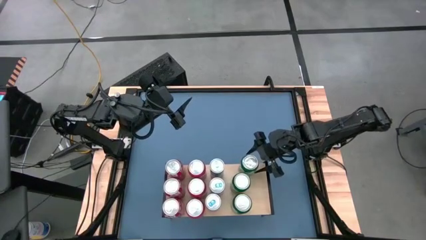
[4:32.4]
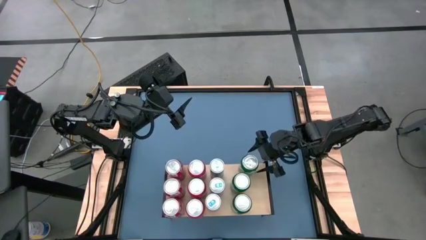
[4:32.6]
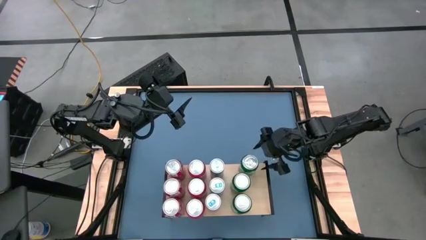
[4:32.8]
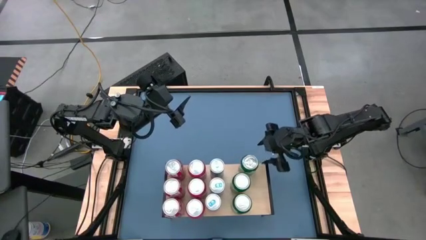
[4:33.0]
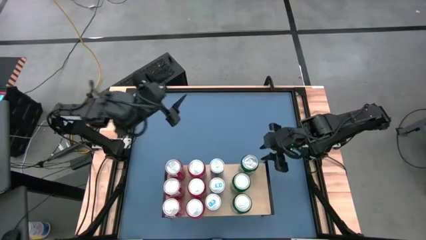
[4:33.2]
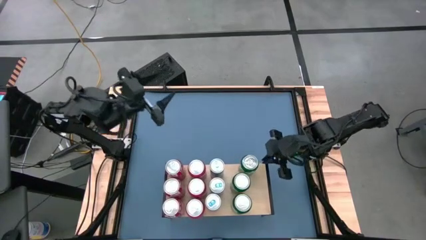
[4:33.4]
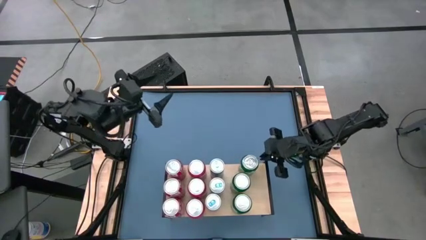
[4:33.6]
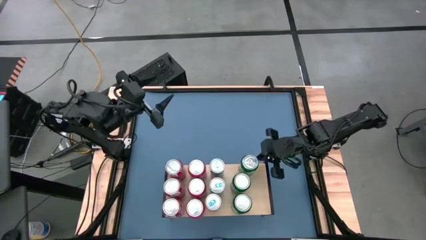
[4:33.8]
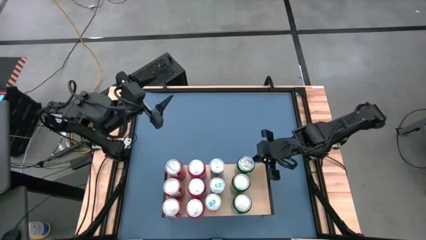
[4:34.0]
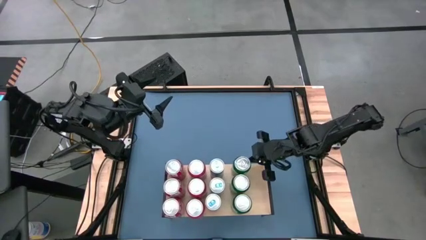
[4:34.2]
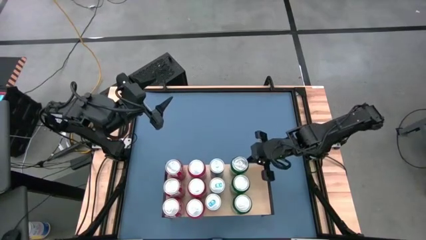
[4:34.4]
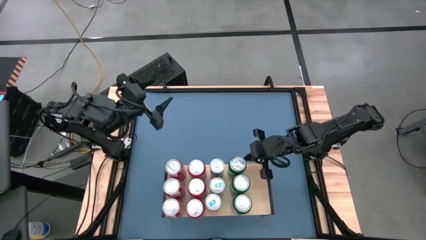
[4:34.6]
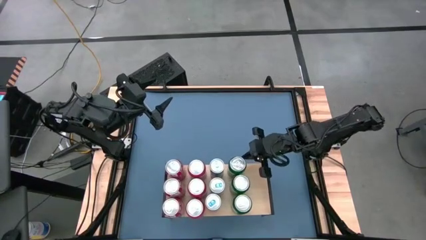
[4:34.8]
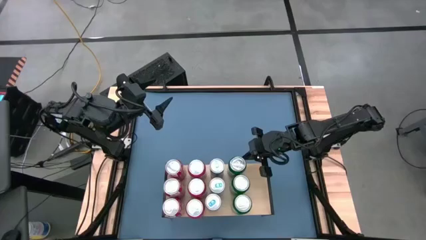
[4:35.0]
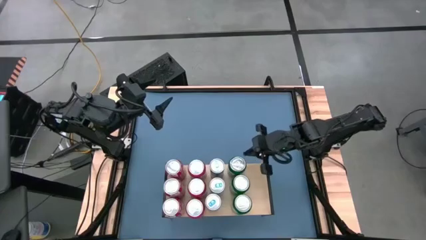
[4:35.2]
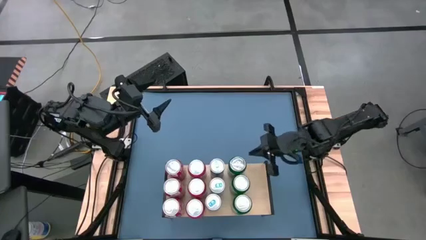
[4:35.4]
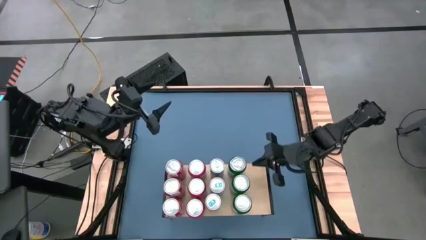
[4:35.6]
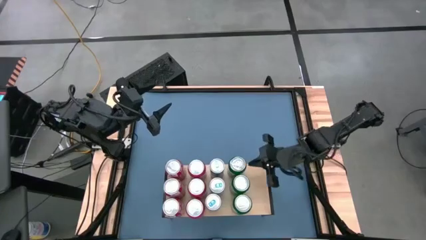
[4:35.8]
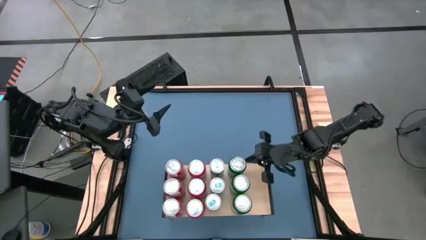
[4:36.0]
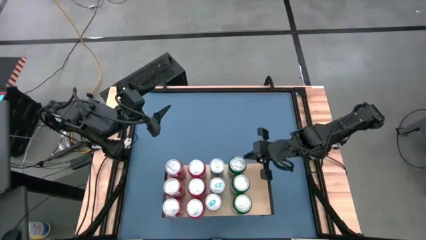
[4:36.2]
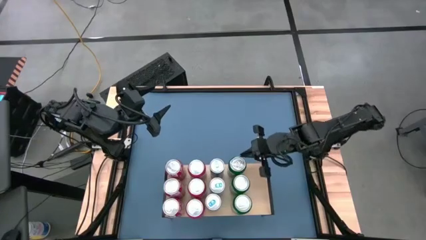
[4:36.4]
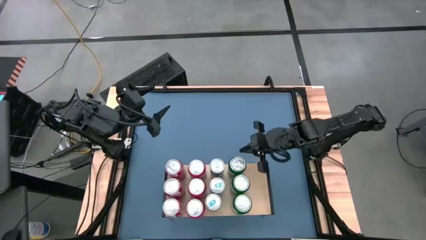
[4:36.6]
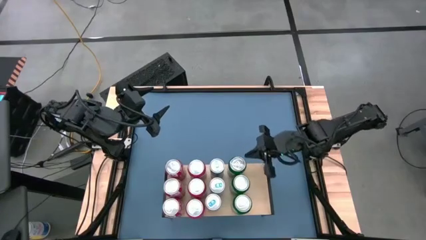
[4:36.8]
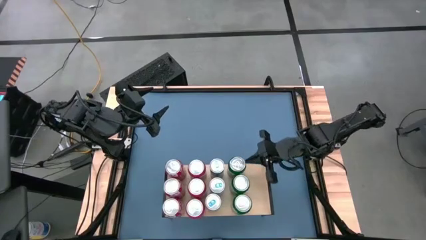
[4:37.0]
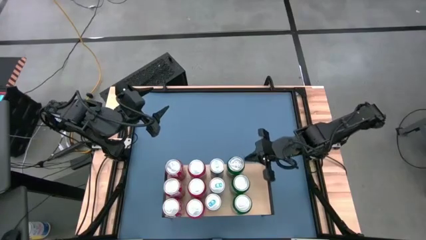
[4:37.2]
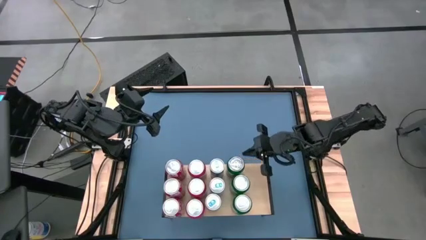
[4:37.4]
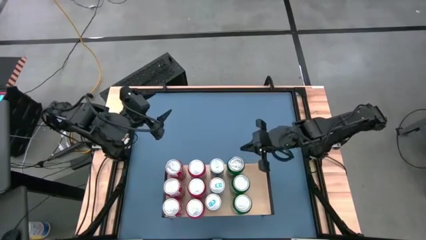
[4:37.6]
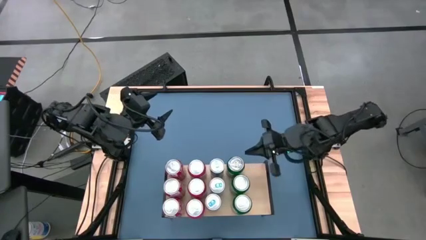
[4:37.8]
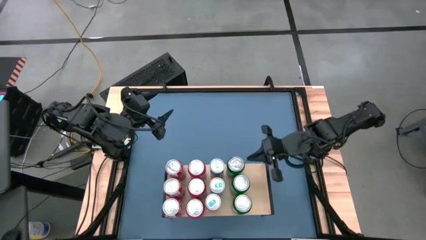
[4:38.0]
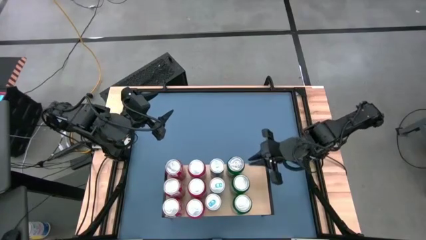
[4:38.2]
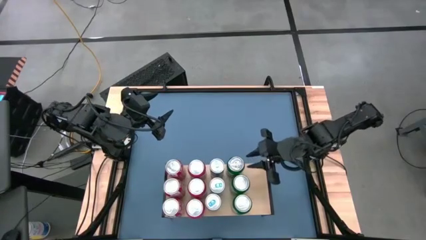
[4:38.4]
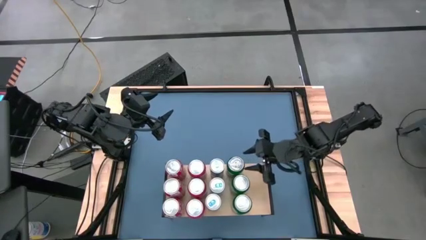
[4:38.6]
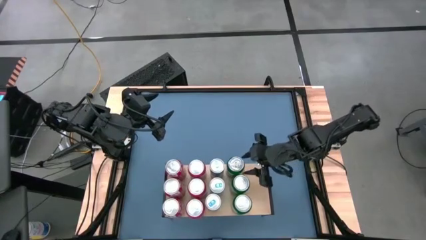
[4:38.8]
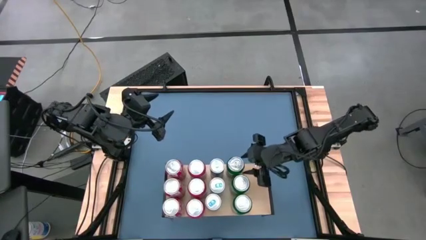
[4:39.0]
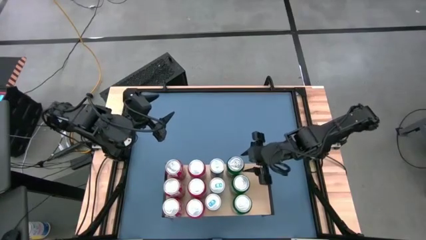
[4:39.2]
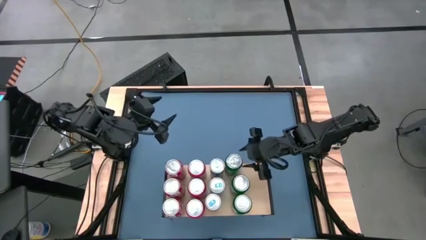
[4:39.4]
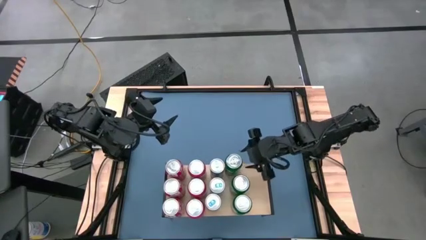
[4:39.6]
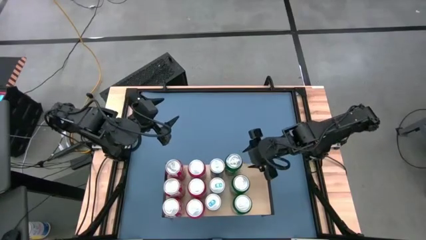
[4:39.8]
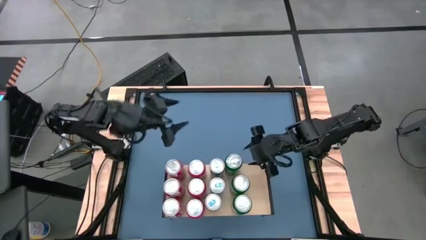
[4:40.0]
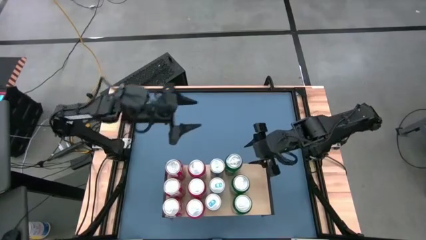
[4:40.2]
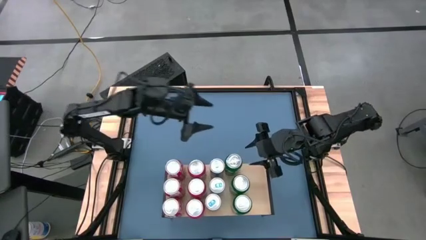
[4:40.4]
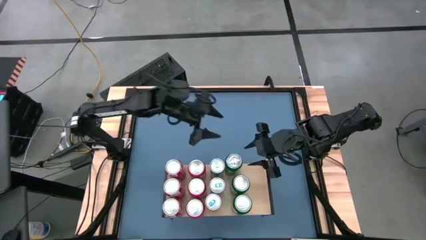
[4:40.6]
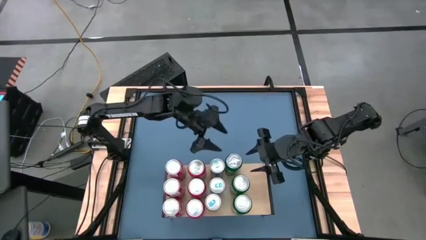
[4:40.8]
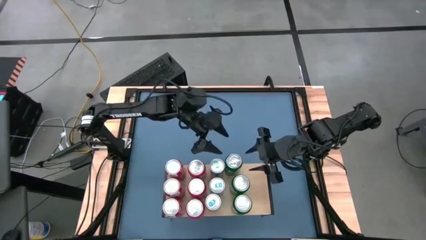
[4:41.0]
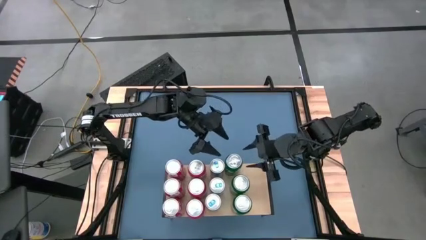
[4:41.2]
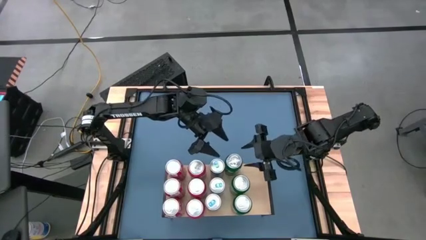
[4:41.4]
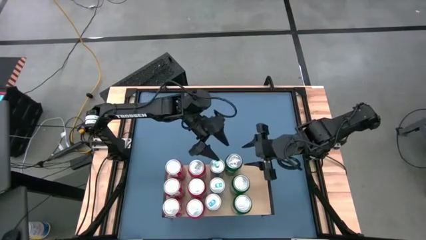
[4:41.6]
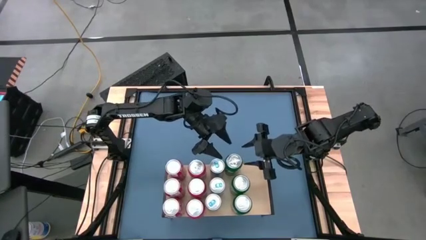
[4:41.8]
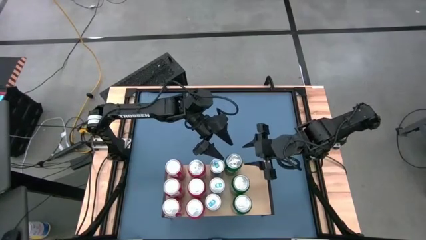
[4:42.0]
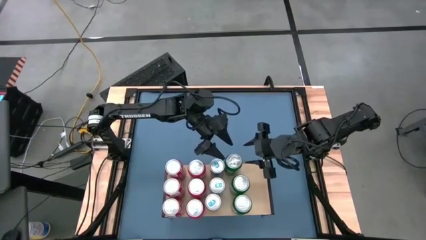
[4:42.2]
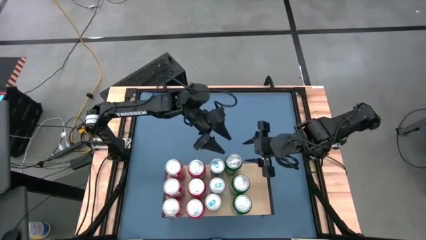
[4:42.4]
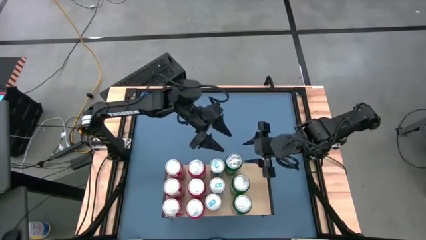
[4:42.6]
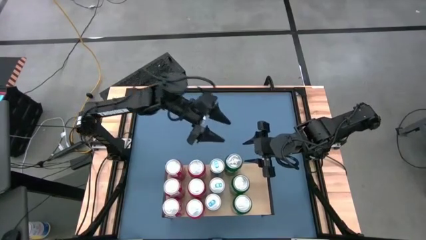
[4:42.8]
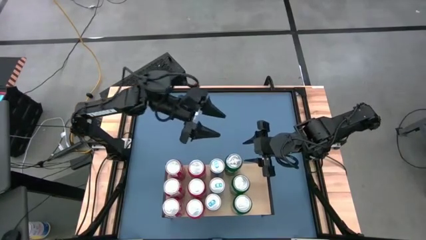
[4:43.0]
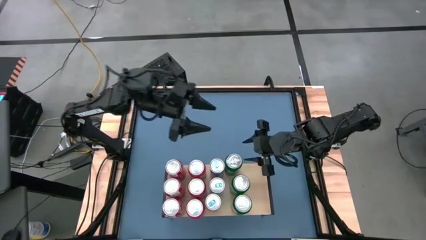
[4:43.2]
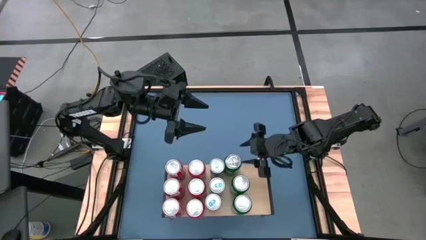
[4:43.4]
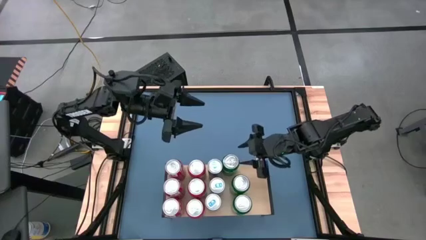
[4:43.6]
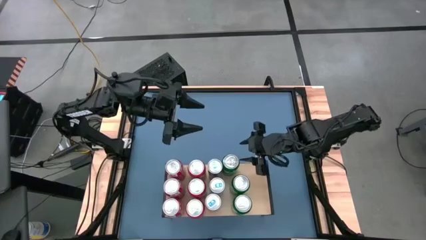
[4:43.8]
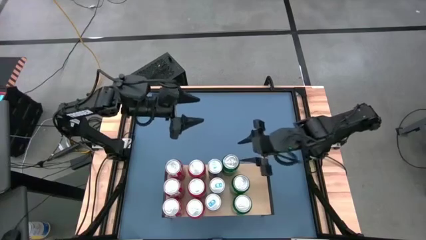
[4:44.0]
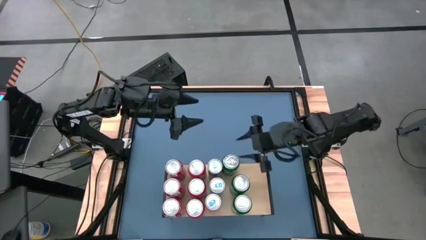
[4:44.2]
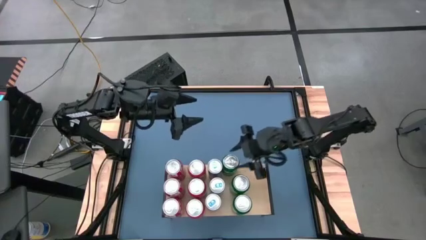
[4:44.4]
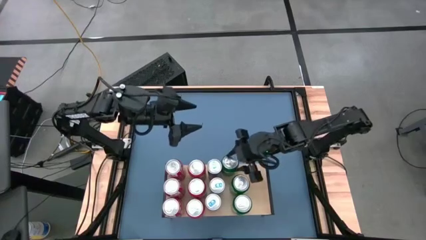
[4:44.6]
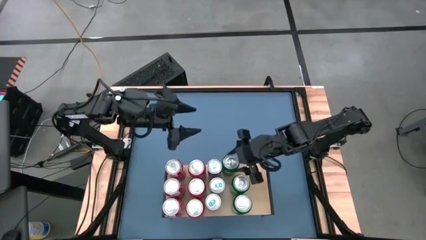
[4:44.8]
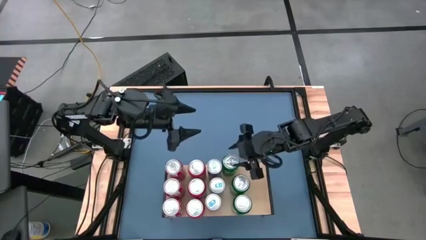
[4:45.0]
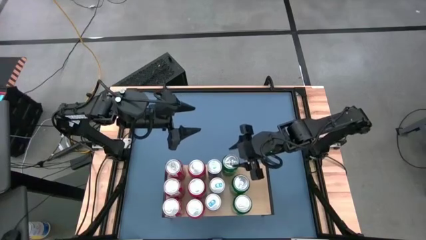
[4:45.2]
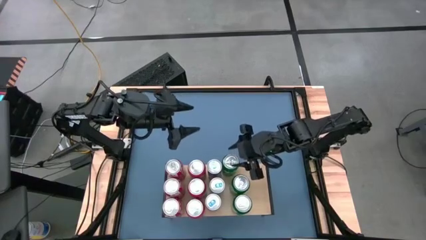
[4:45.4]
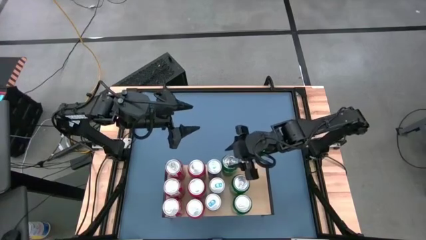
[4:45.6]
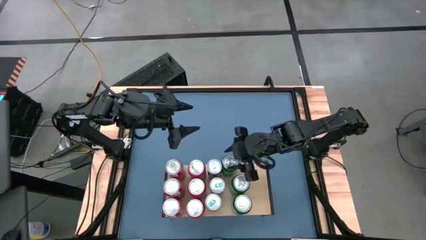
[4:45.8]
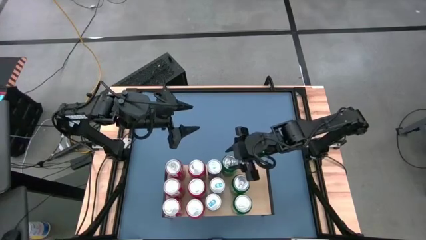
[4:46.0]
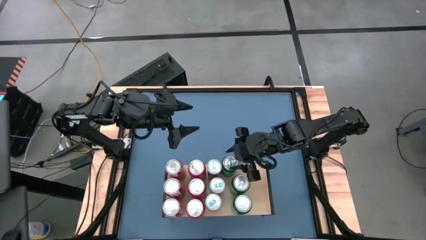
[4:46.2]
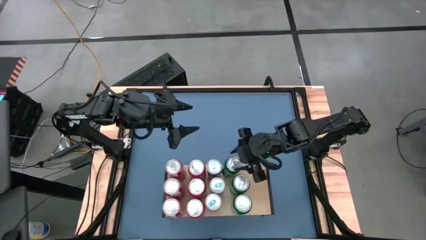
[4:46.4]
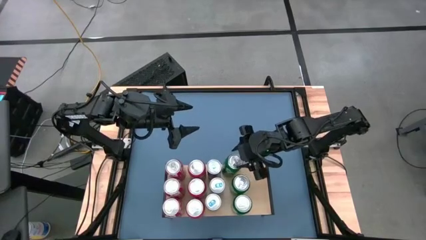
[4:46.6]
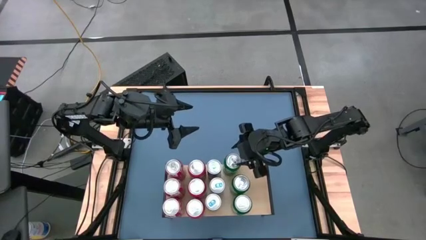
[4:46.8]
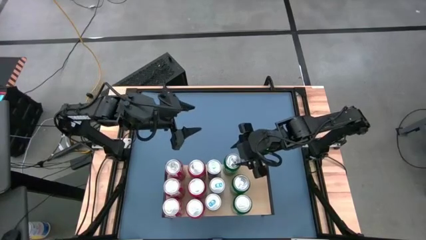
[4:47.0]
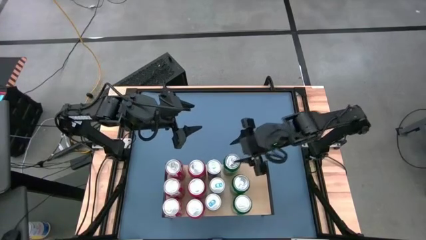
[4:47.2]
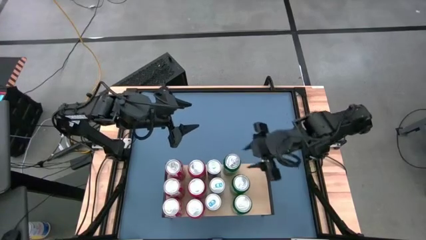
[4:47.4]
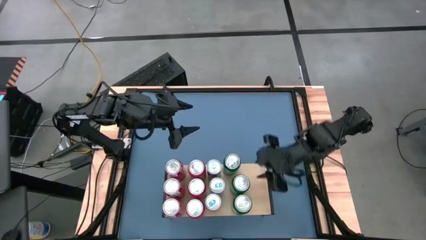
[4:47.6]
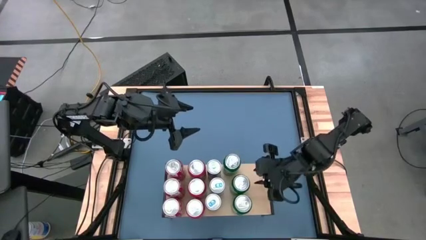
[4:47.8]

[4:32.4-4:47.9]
Task: Place canned beverage on shelf
Put the green soda can on the shelf

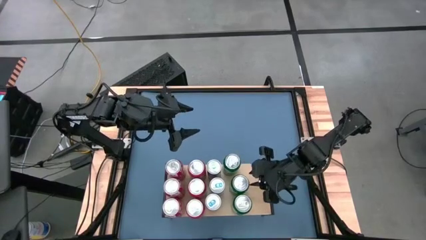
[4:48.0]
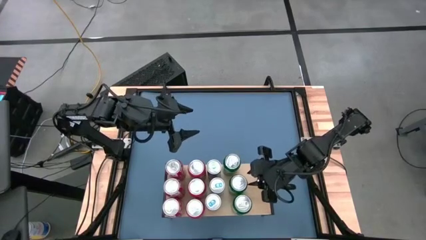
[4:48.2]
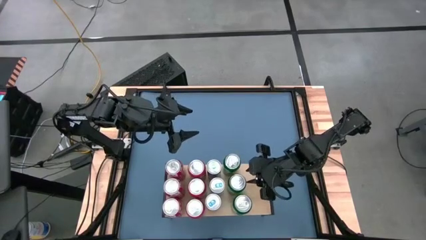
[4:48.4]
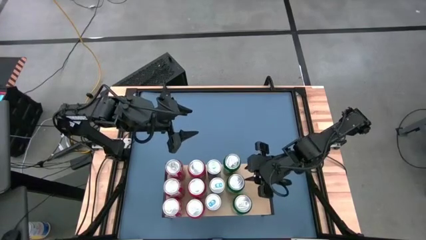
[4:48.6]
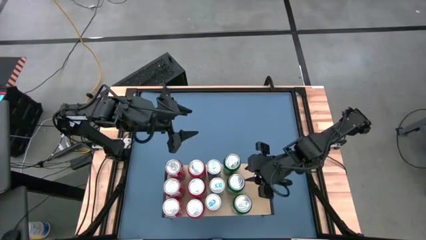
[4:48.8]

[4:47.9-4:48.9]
Adjust the green soda can on the shelf

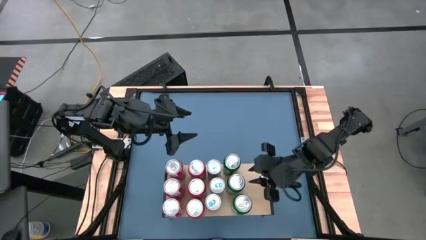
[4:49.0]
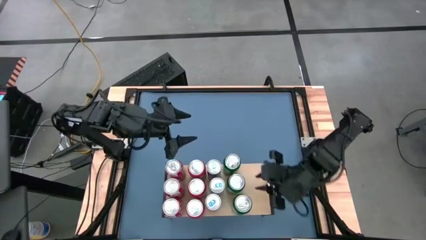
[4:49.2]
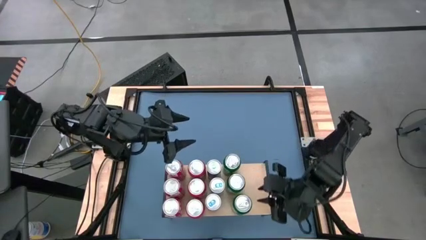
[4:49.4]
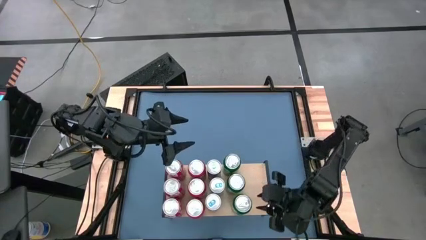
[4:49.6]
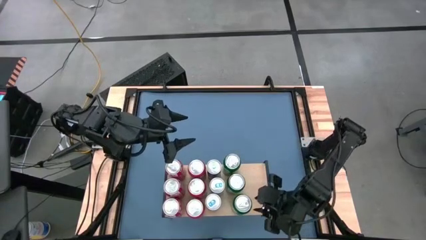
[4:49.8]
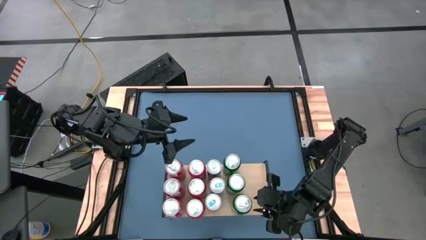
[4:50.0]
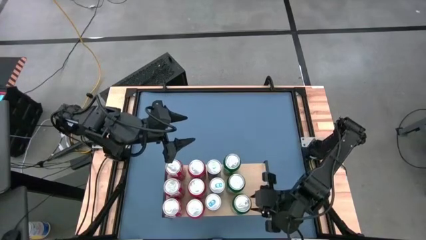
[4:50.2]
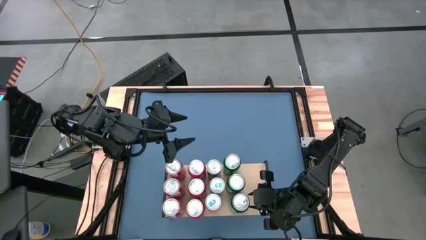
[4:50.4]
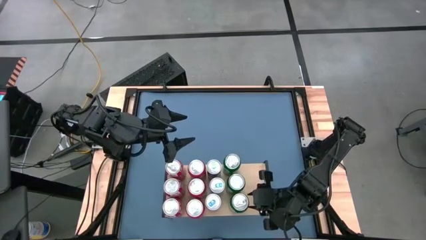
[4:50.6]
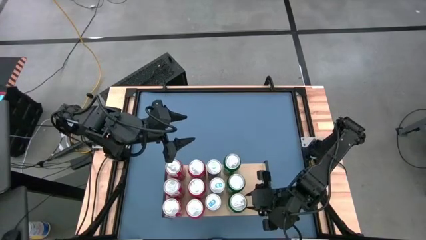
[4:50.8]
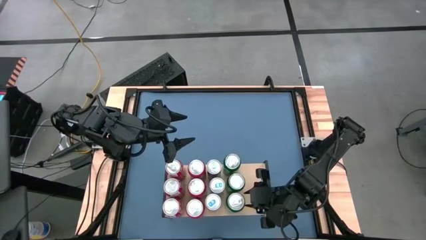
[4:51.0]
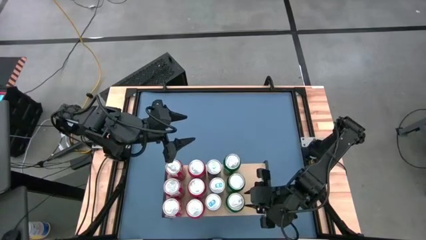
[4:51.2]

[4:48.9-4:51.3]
Adjust the green soda can on the shelf
